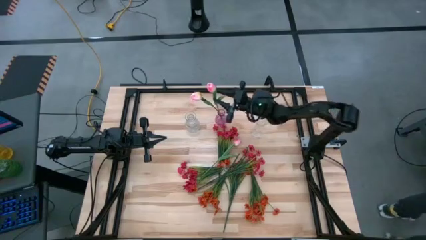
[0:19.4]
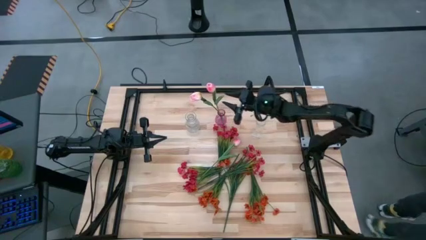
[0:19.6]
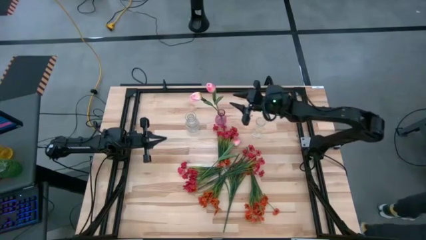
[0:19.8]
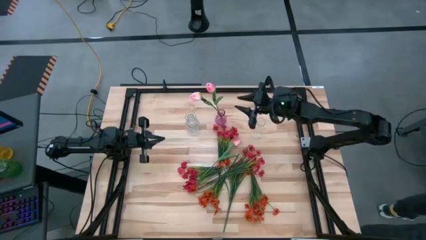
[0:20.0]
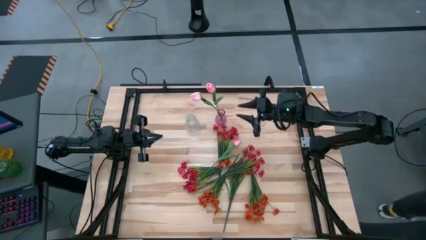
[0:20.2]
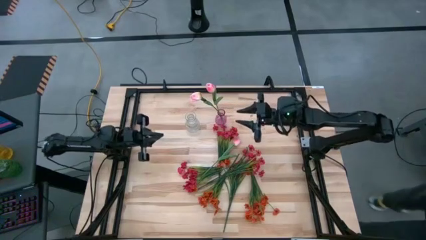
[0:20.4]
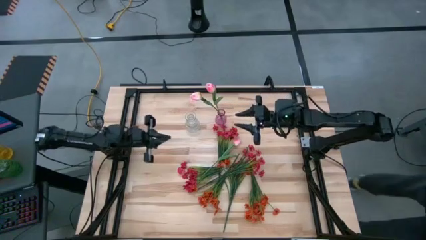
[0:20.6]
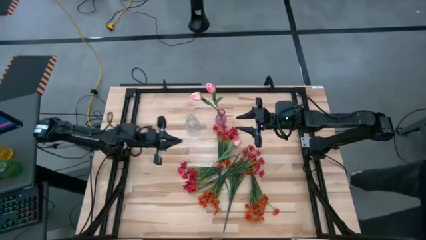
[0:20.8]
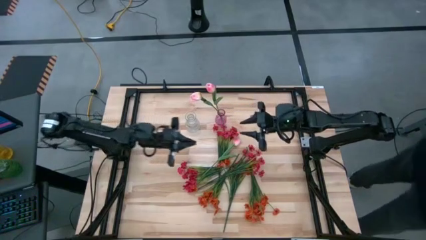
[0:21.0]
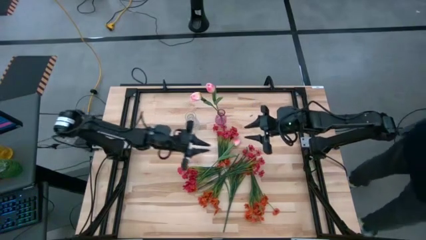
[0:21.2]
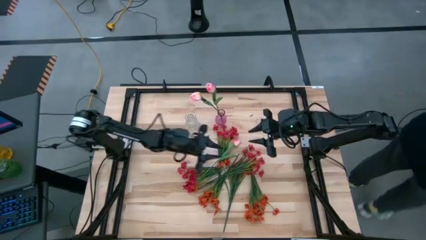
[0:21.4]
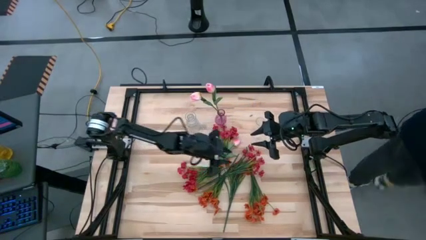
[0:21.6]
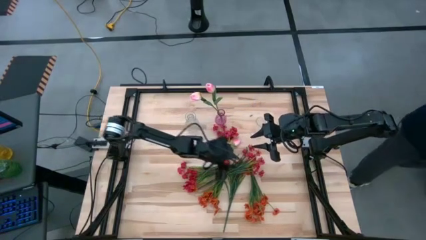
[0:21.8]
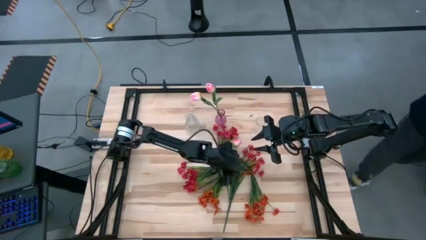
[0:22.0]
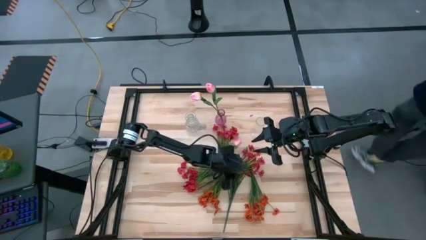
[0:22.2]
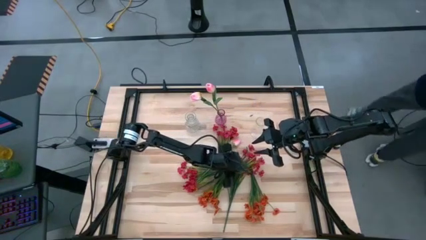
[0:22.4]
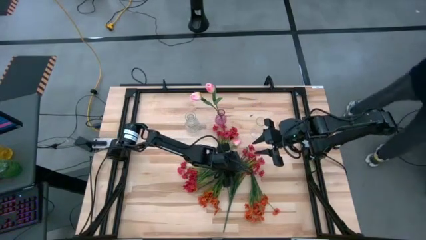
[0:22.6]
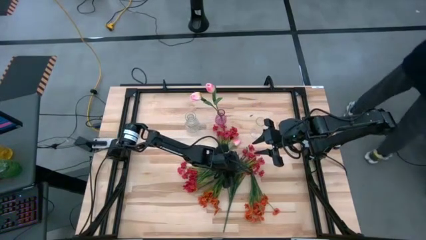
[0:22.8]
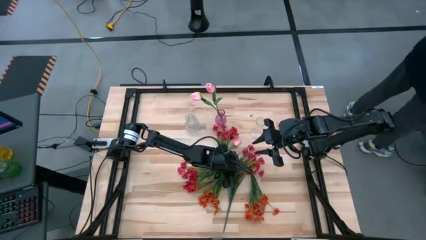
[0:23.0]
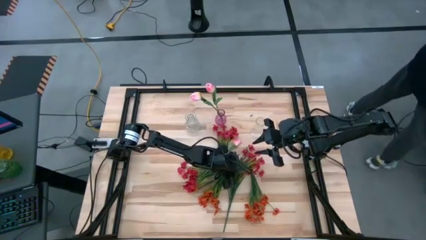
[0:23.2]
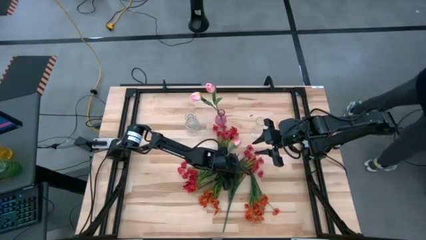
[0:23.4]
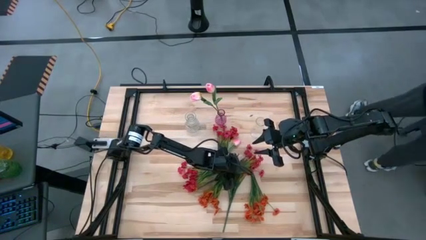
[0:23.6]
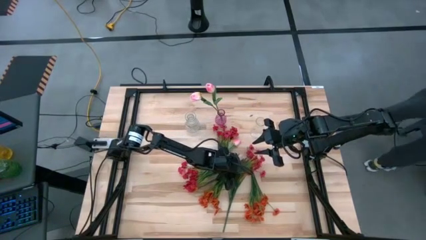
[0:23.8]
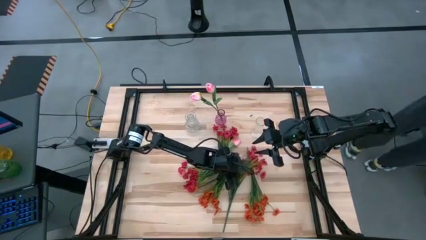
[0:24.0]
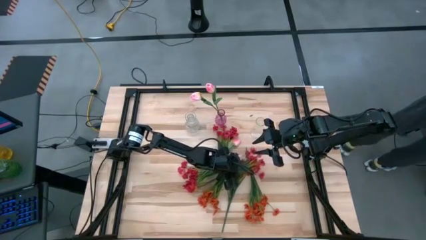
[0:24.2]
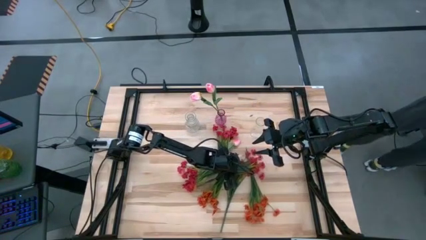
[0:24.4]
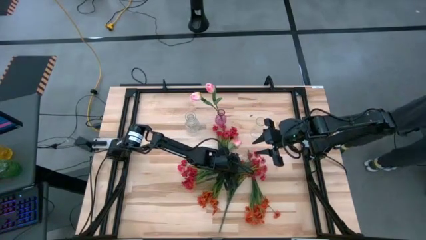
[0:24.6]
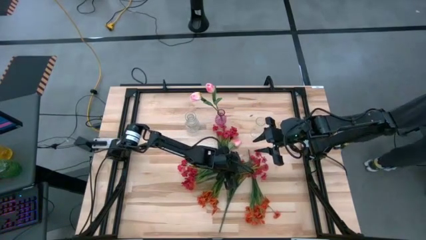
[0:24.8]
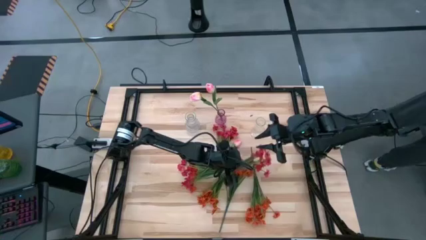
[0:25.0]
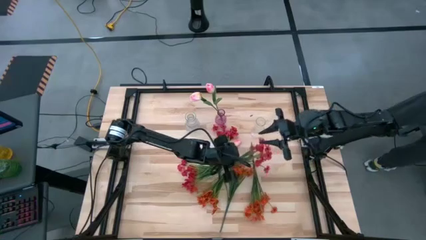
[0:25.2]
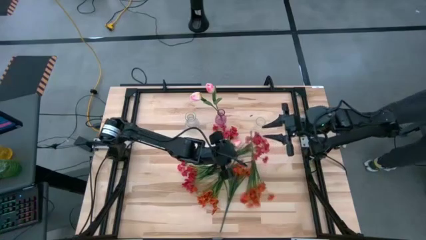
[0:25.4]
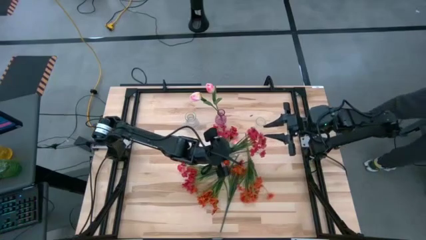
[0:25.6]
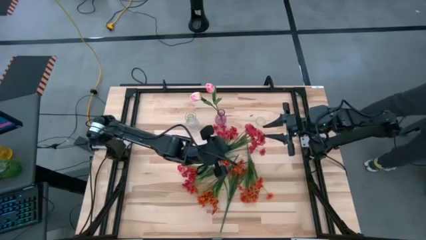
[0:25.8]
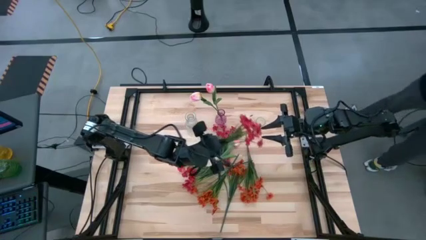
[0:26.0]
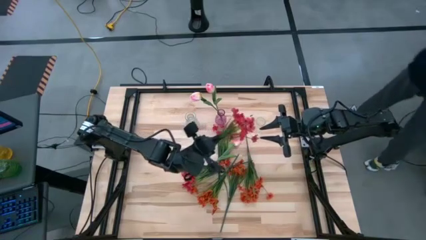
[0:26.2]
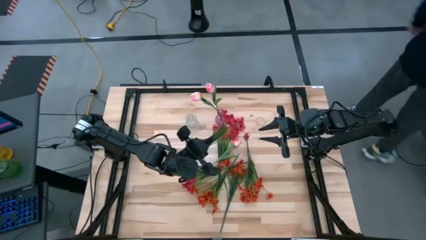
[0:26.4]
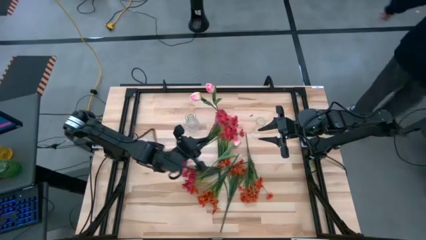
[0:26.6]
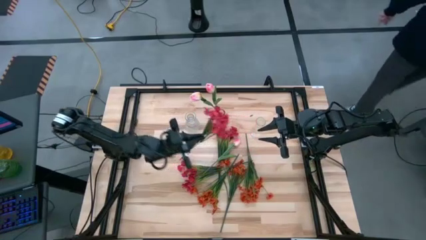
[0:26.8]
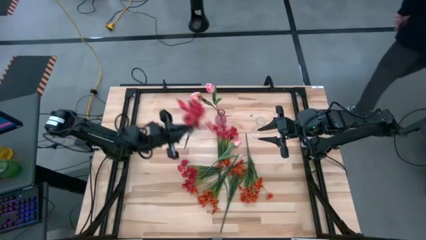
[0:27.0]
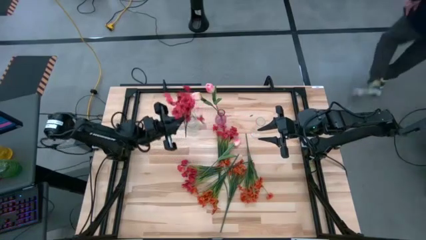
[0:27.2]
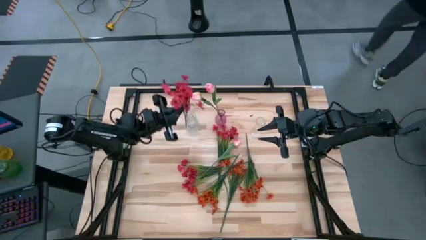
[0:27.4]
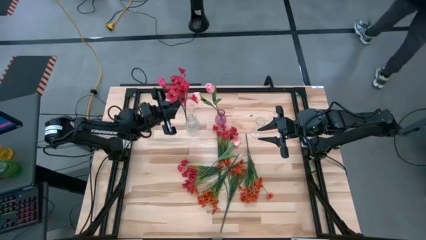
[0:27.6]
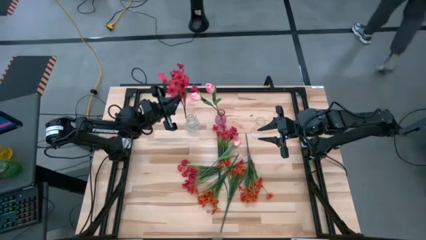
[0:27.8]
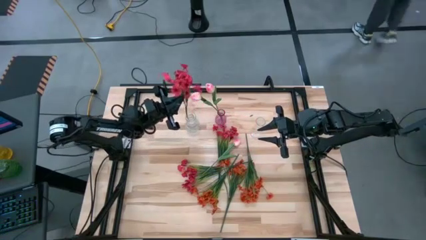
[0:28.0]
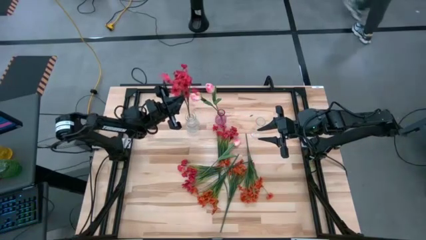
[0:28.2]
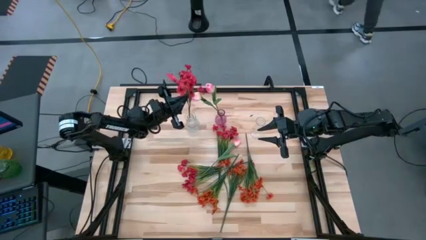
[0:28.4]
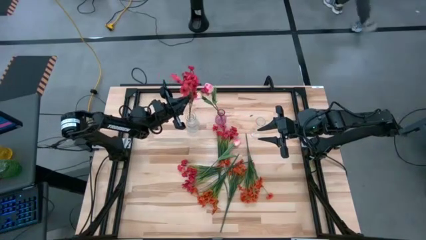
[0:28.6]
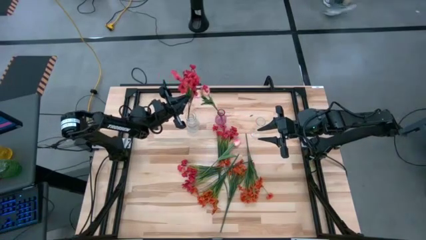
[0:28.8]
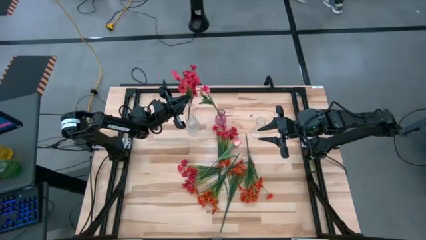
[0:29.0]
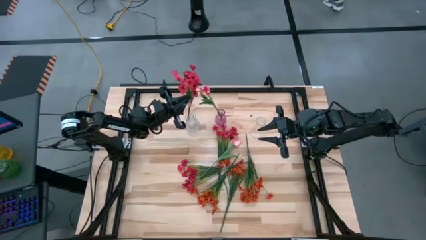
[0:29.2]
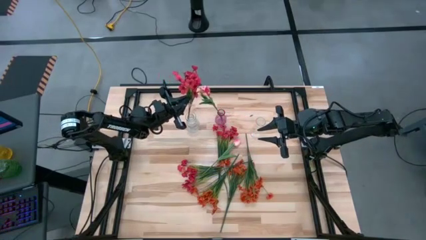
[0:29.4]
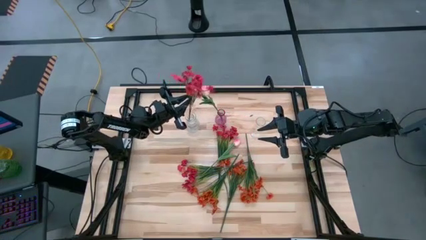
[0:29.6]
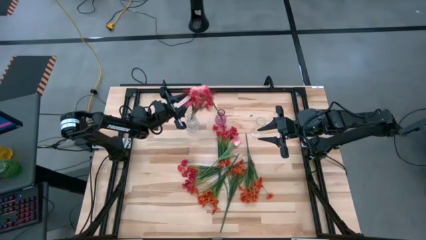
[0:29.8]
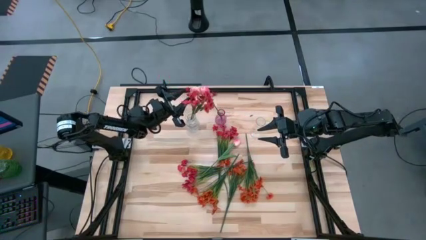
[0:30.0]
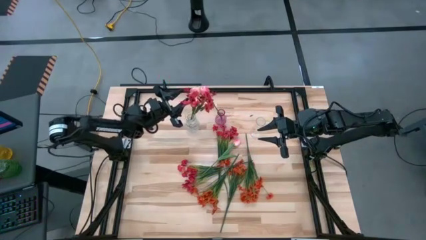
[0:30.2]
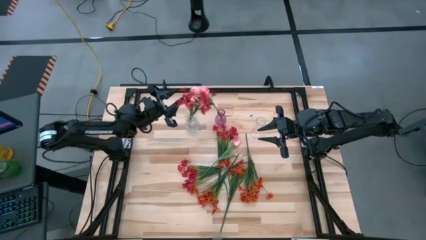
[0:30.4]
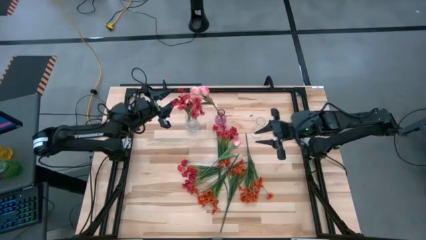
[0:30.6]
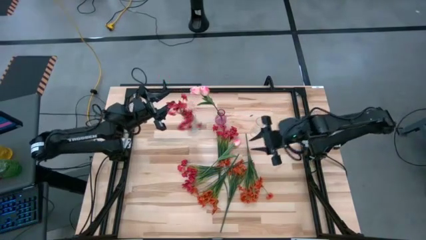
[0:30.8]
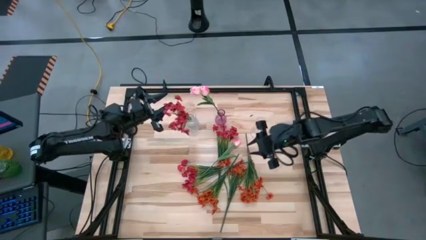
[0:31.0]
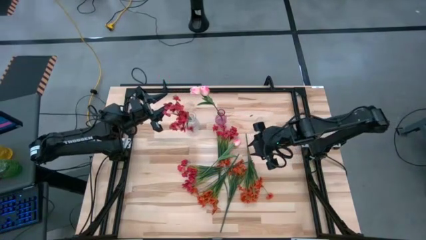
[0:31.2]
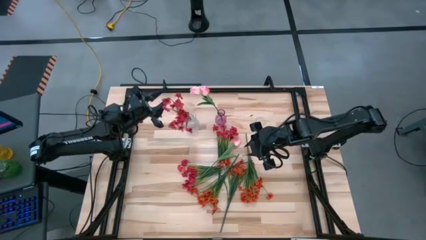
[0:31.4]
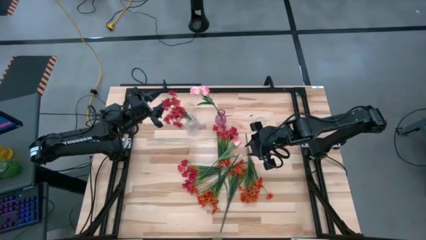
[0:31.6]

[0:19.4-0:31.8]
Task: Sort flowers into vase by color
Put the right red flowers into the left transparent vase

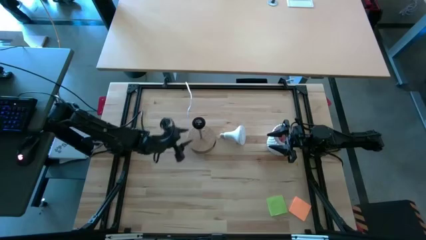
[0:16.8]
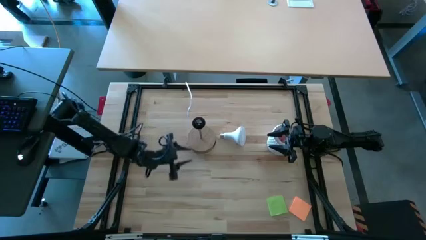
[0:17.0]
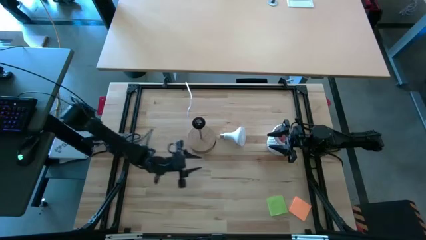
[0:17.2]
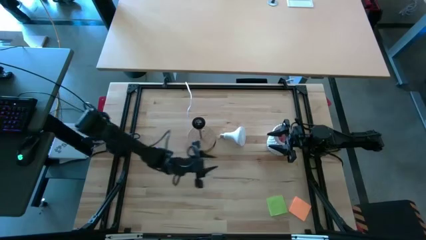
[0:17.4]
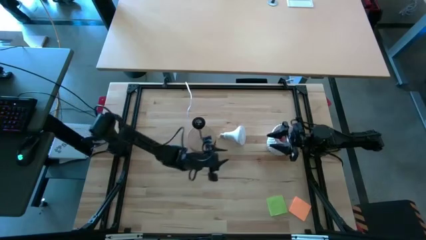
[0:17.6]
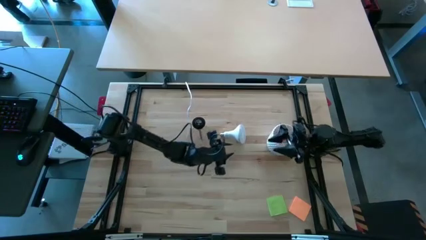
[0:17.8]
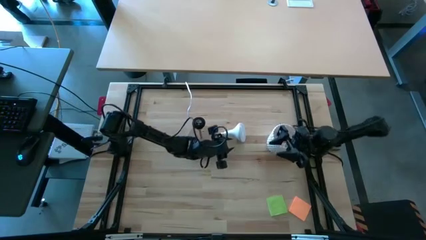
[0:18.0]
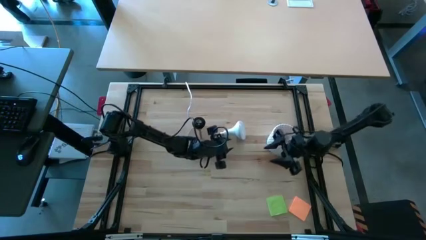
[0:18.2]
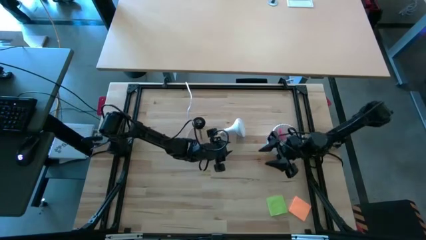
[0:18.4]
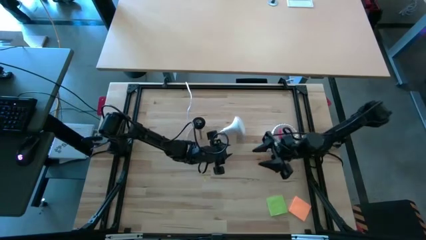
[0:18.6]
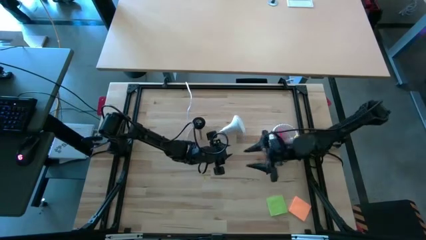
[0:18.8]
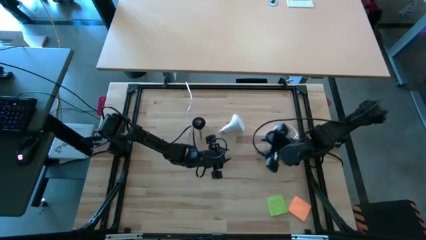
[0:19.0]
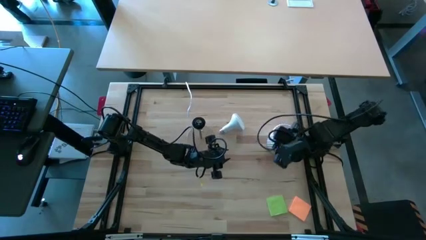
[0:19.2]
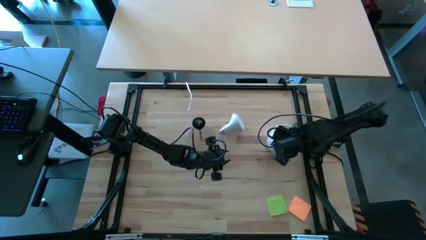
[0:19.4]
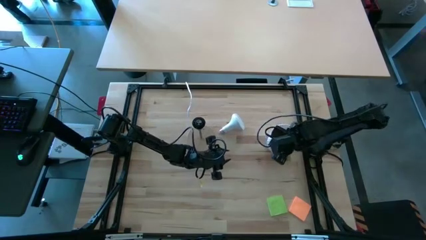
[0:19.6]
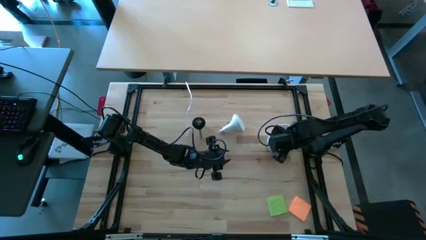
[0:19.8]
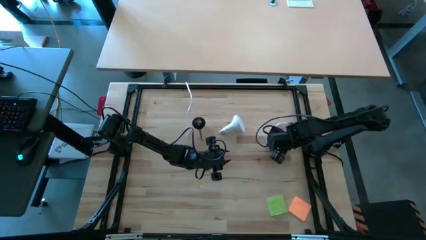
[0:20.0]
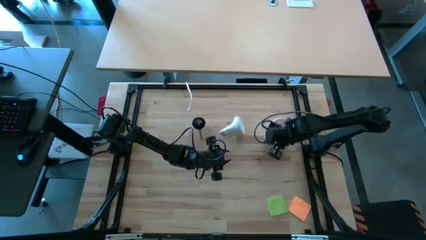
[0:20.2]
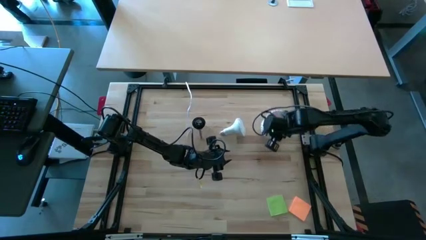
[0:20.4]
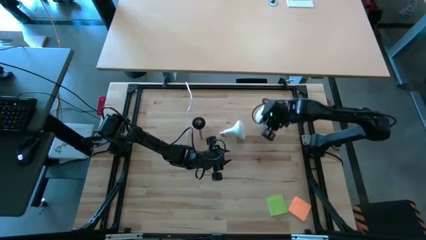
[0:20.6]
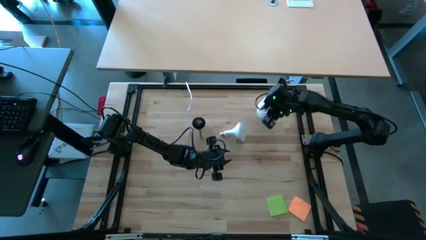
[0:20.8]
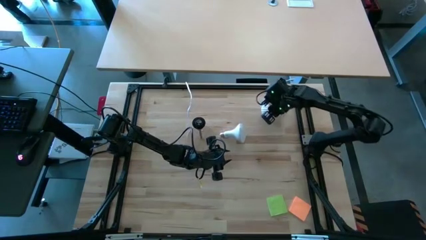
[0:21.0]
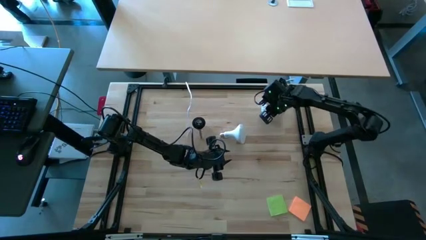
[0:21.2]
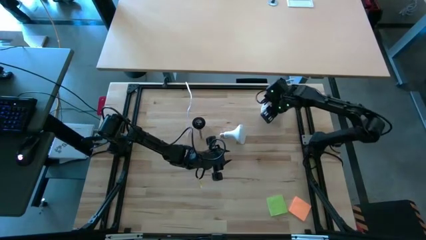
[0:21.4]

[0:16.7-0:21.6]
Task: Screw lightbulb
Move the desk organizer to the top right of the table
